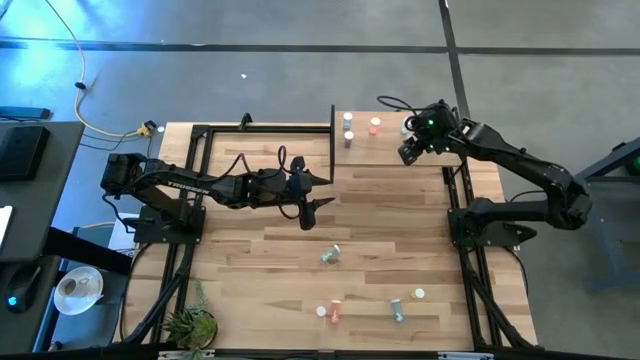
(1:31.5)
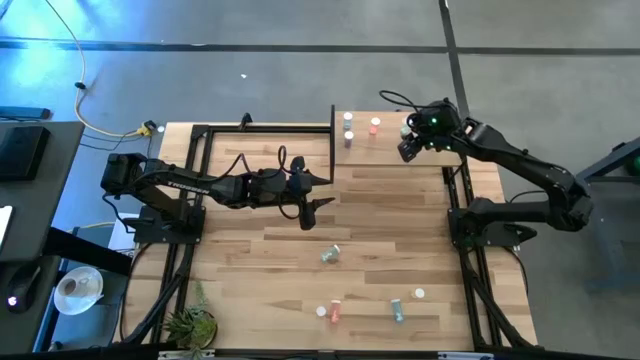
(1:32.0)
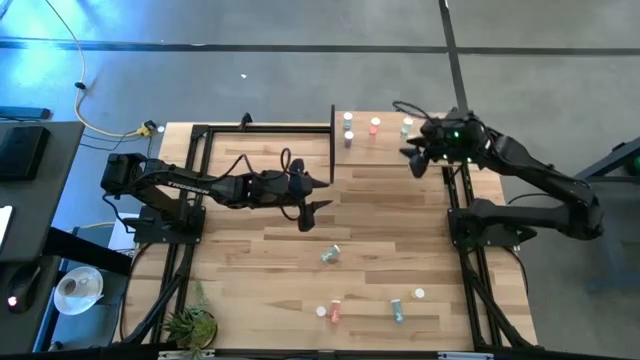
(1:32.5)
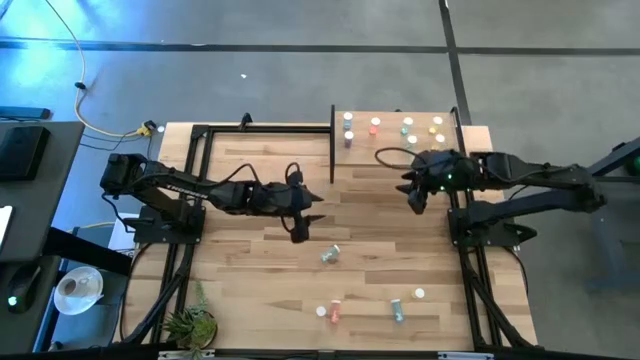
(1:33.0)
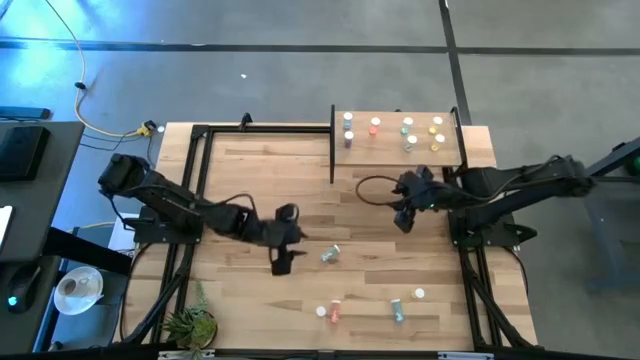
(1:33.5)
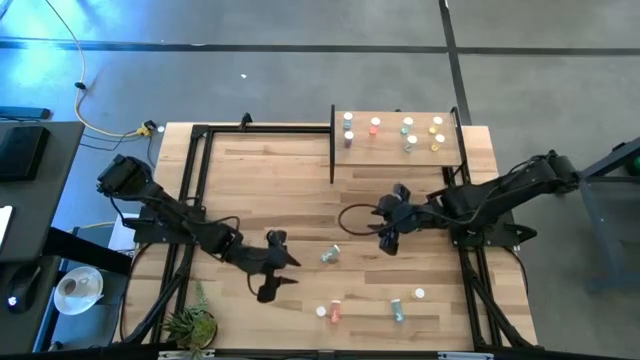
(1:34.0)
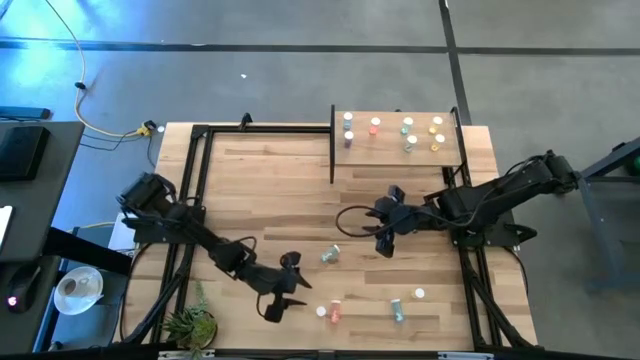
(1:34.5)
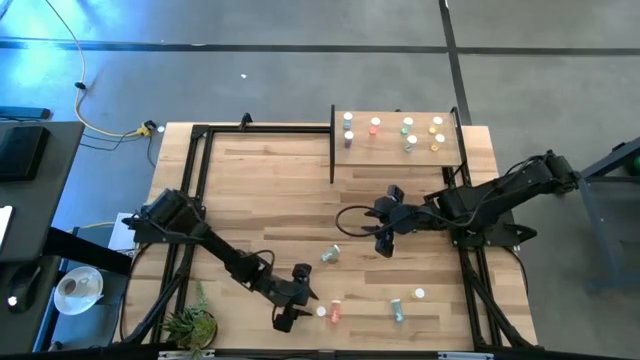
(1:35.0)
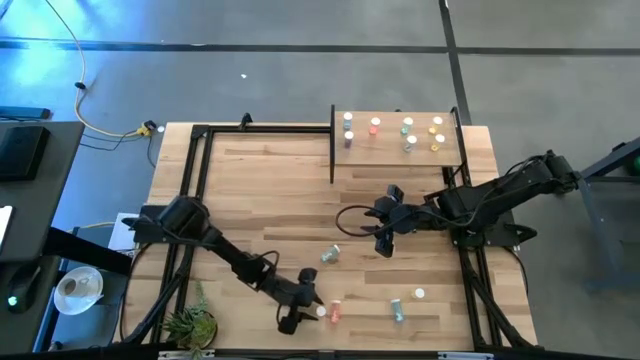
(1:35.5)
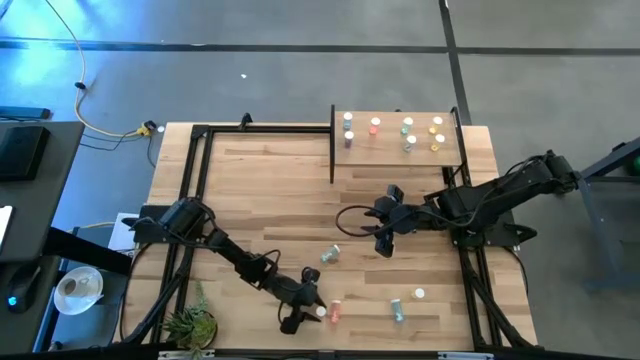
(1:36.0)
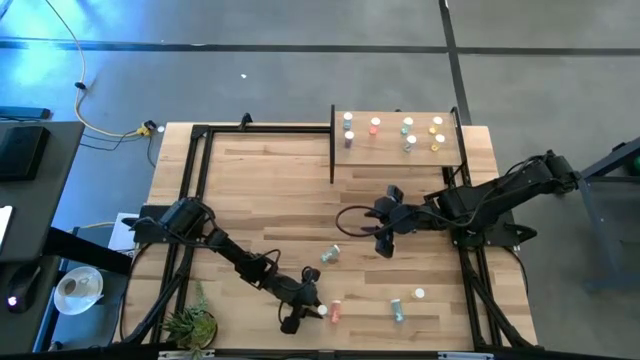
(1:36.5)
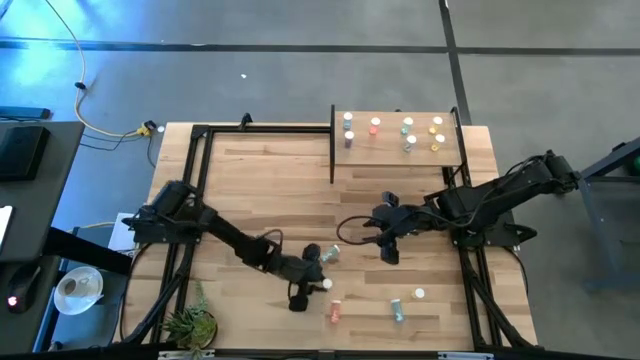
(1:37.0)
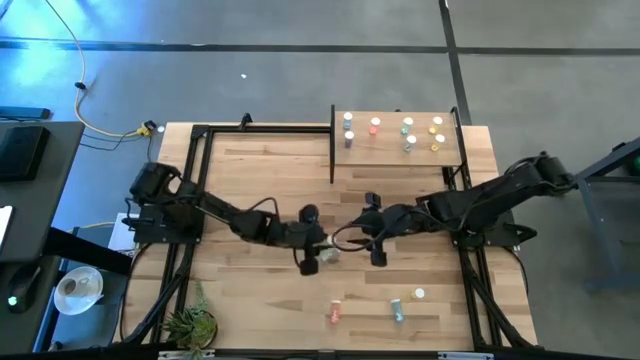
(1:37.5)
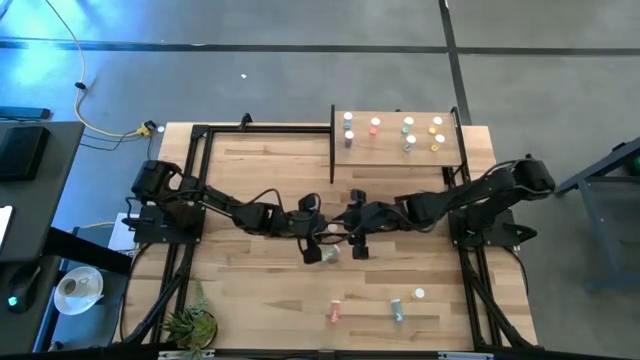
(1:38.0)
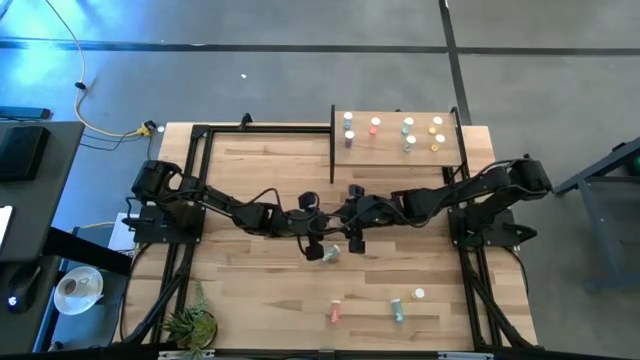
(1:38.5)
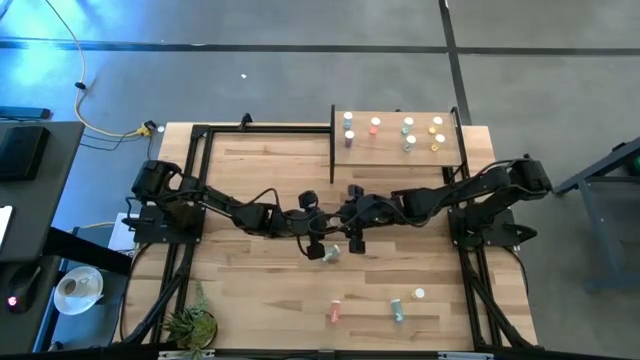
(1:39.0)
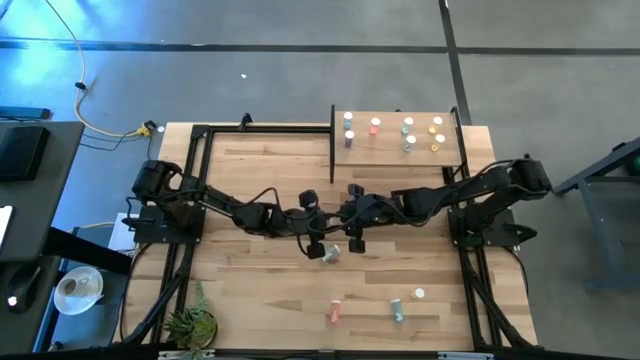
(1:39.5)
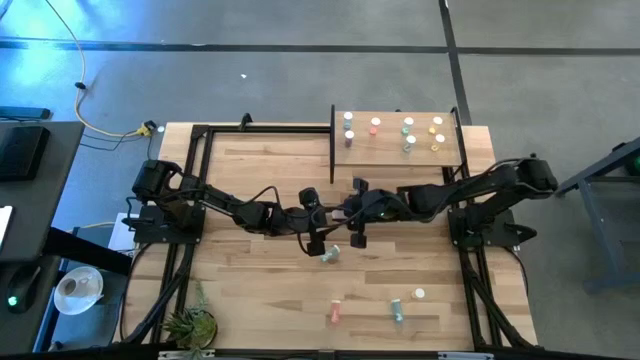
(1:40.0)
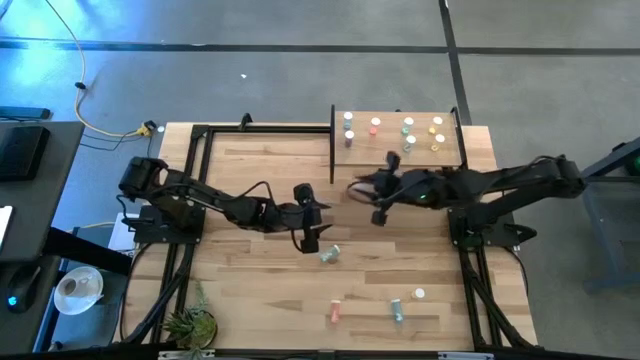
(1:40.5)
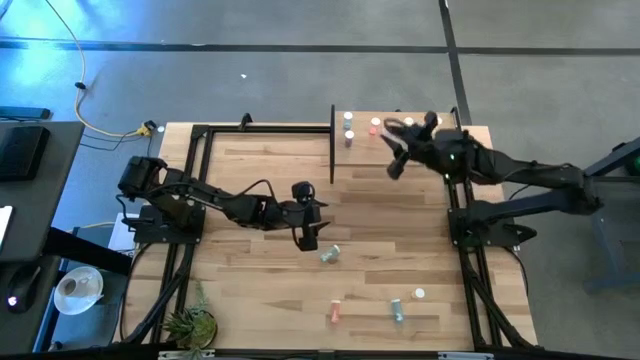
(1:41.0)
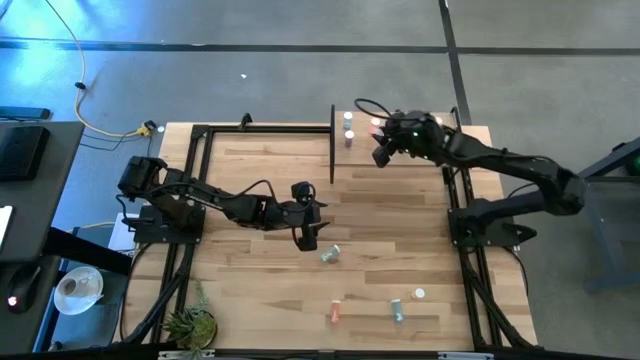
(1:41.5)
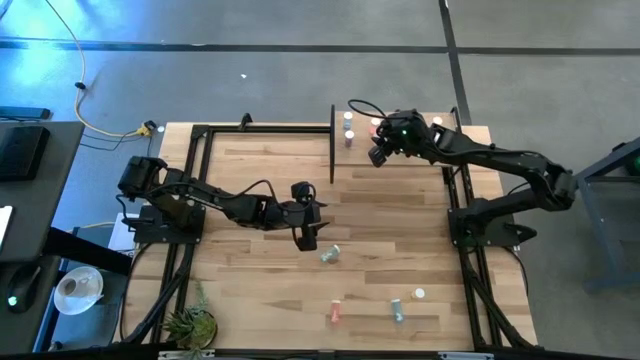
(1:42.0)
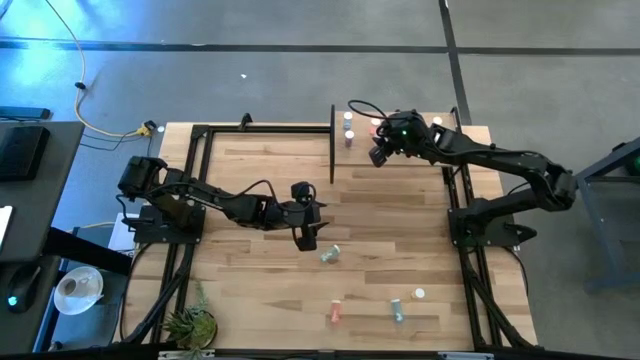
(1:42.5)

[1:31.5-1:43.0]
Task: Pick and place medicine bottles onto shelf by color
Put the left pink pill bottle on the shelf aligned with the pink pill bottle

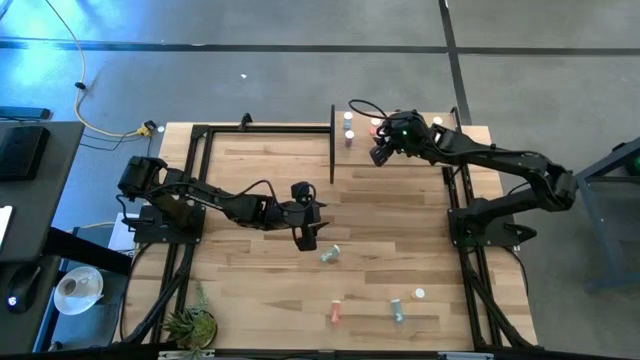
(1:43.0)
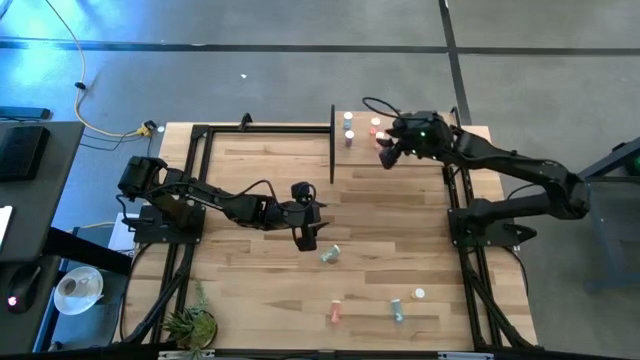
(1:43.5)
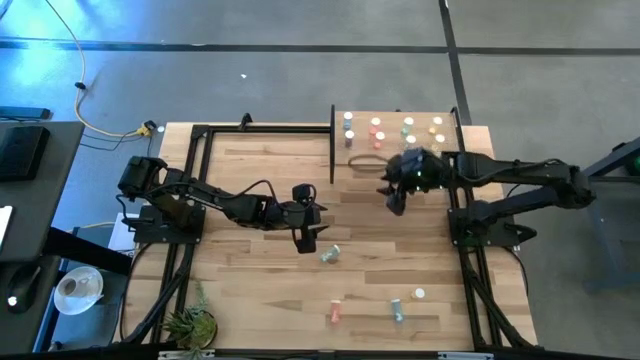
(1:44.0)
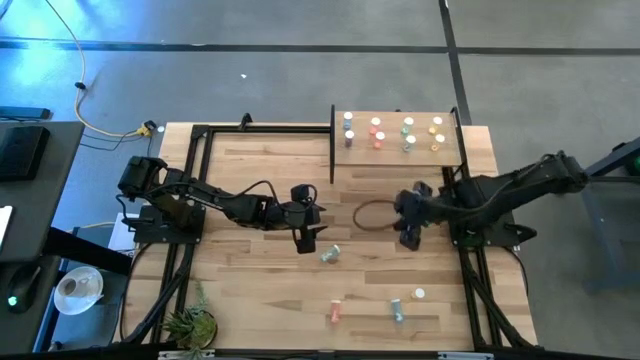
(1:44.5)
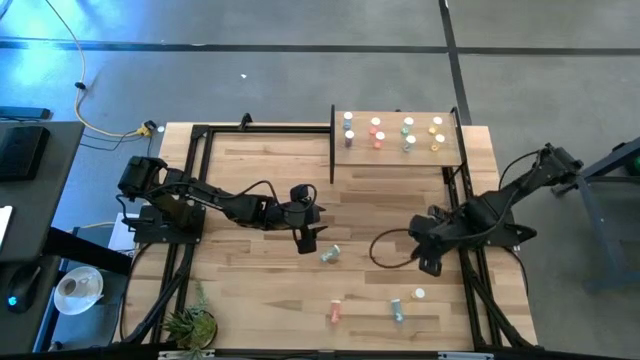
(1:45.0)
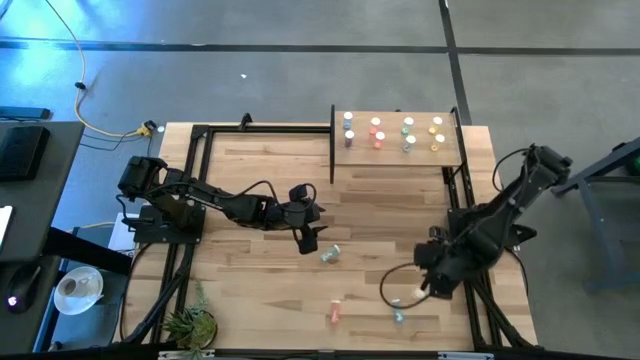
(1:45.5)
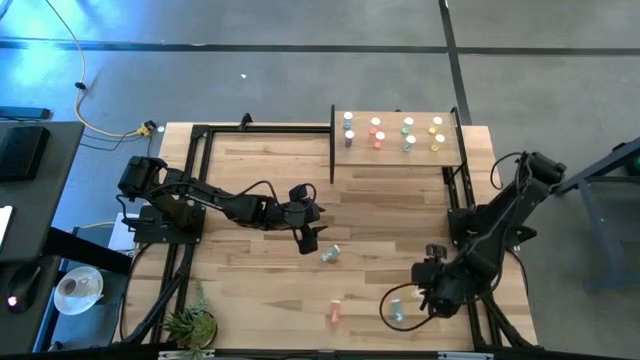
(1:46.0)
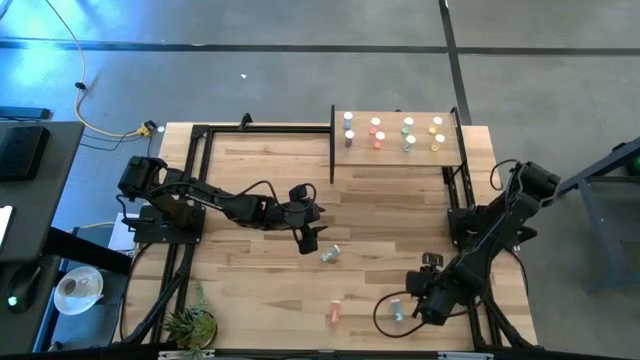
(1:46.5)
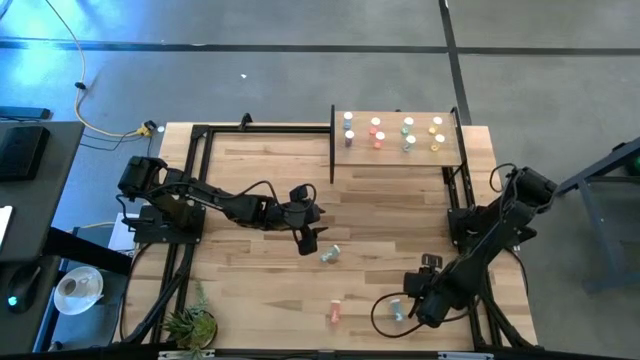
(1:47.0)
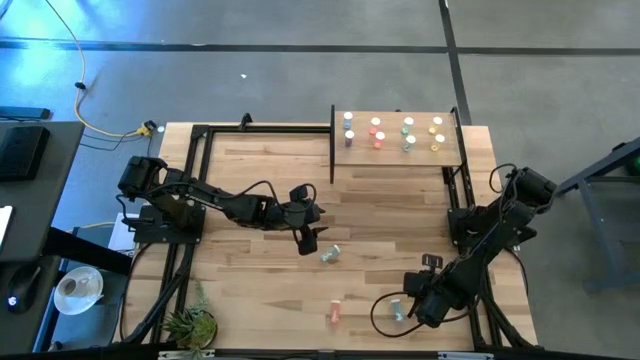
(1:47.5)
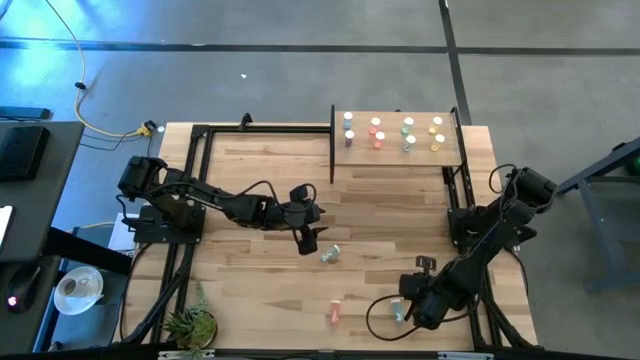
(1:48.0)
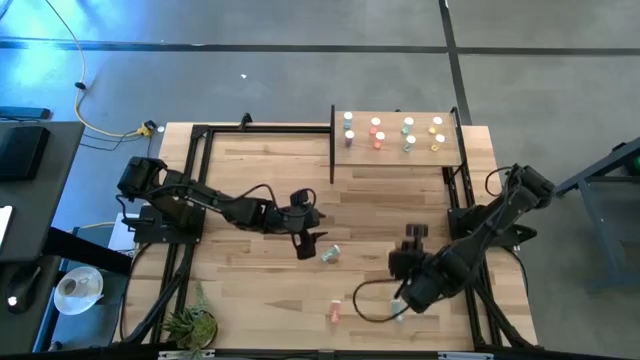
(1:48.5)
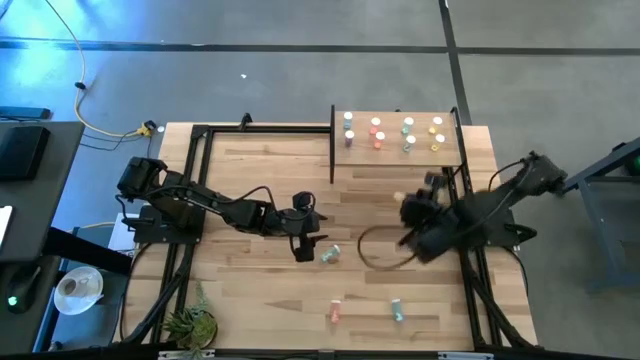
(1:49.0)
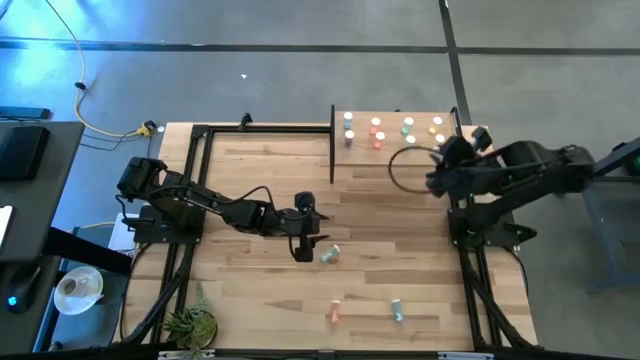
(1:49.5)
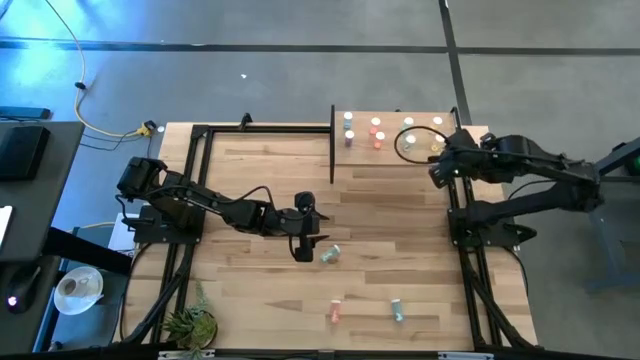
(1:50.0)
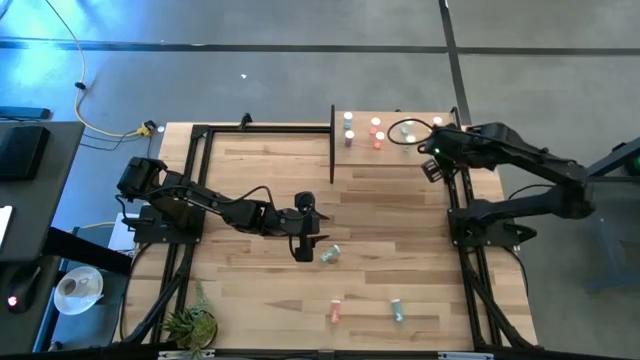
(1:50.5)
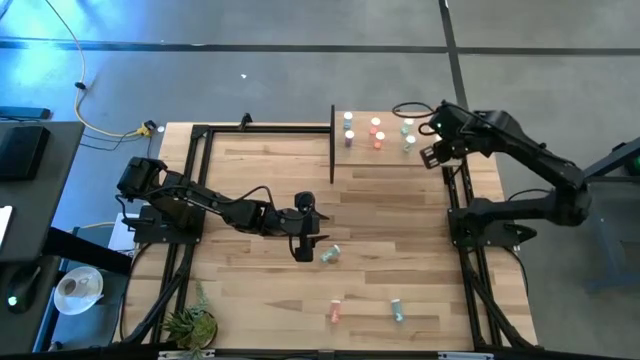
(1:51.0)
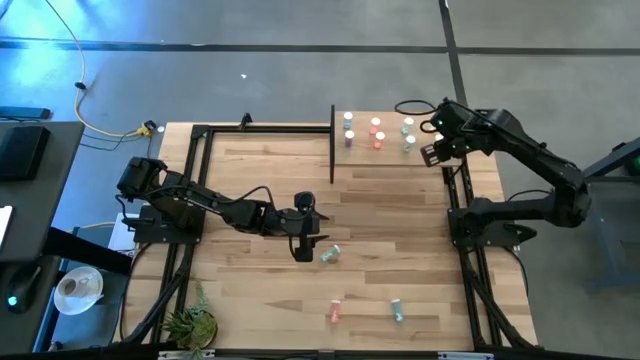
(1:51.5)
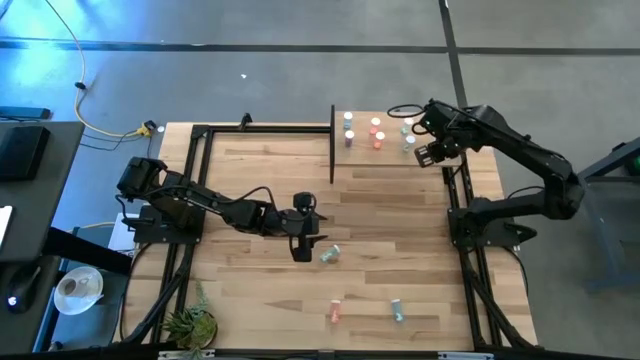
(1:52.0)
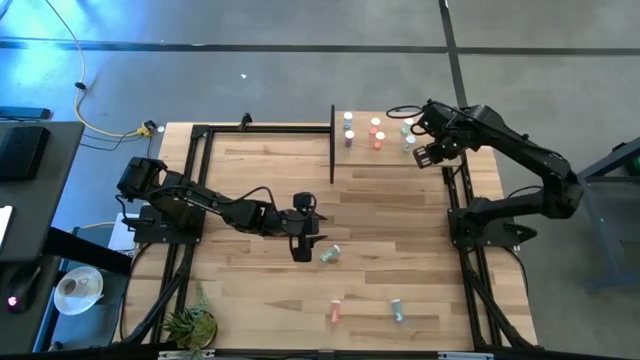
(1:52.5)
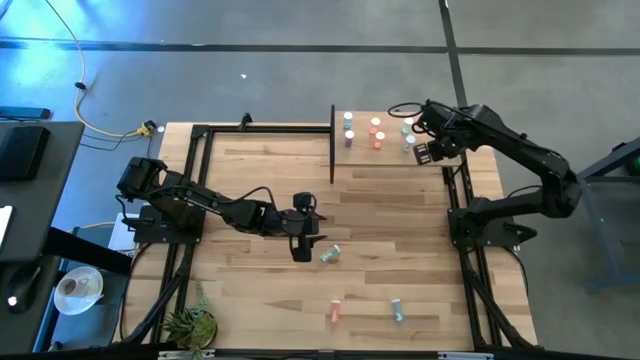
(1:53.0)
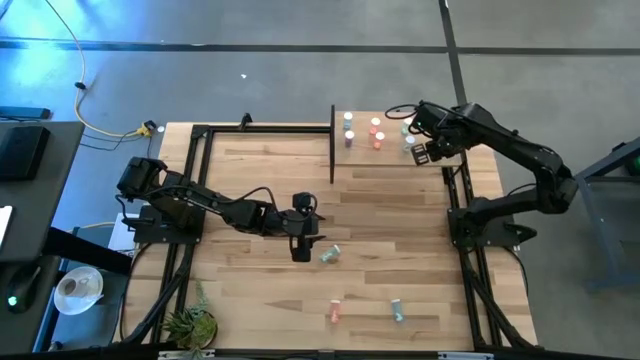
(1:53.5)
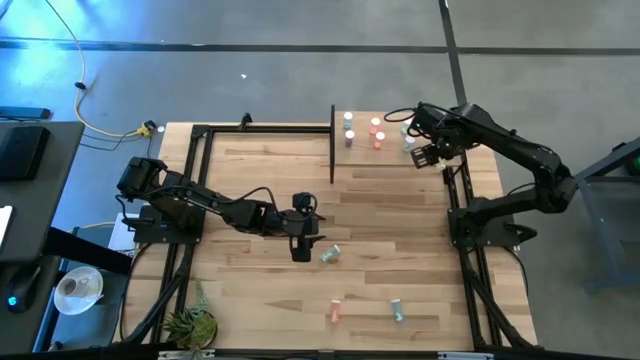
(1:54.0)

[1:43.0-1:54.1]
Put the yellow pill bottle on the shelf aligned with the yellow pill bottle
